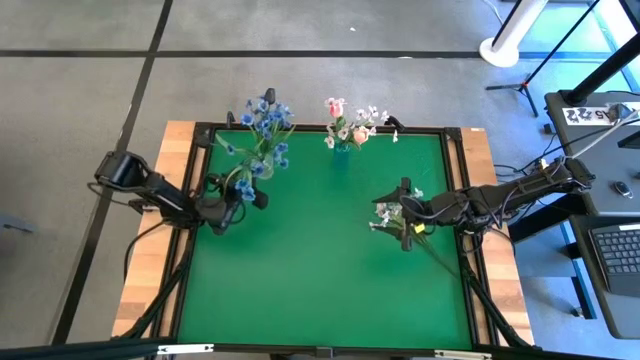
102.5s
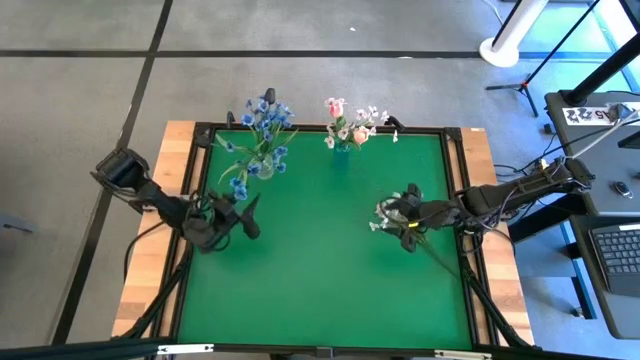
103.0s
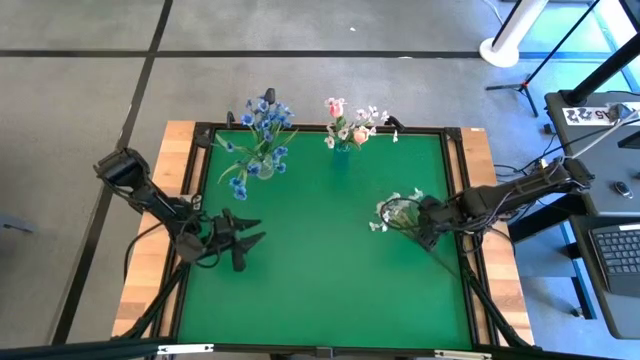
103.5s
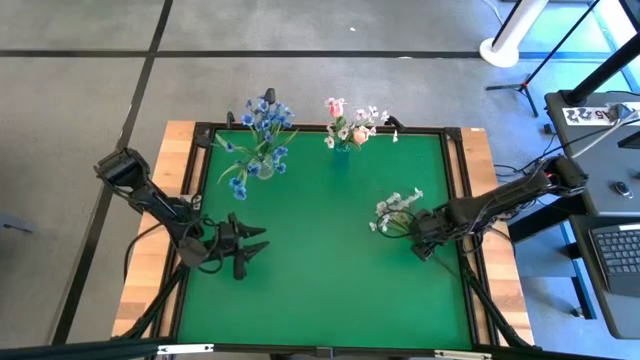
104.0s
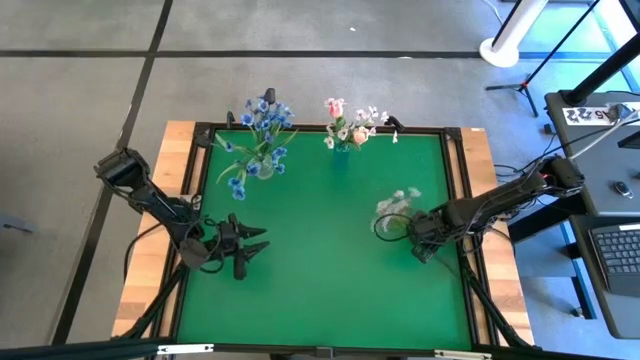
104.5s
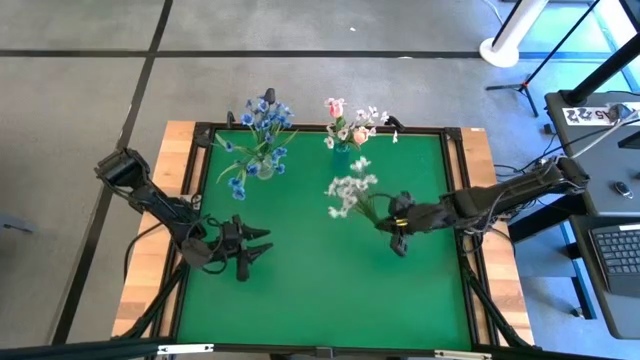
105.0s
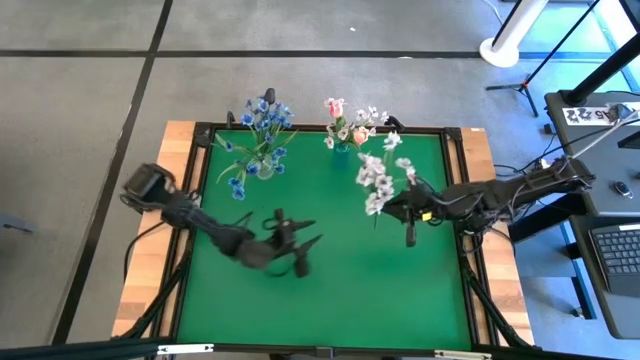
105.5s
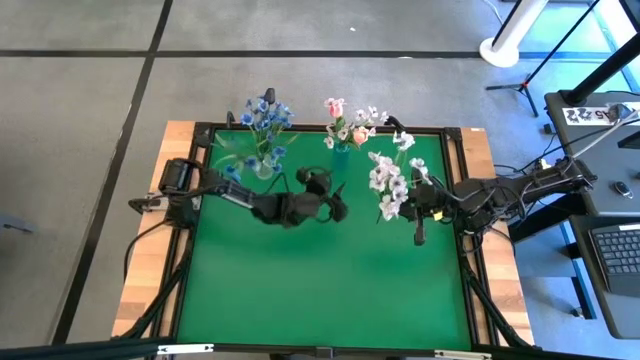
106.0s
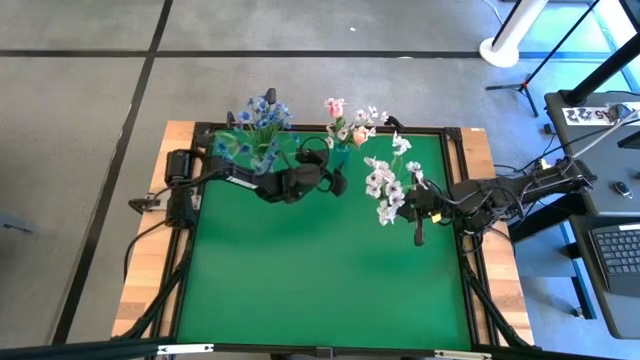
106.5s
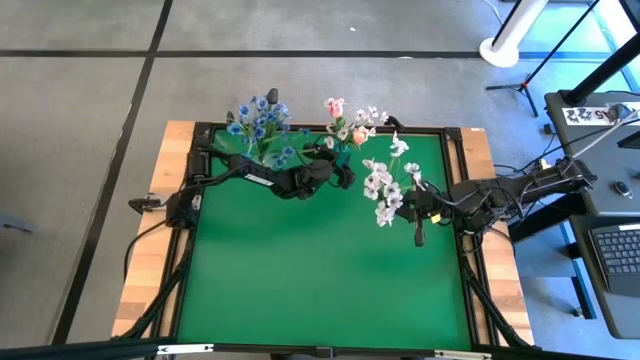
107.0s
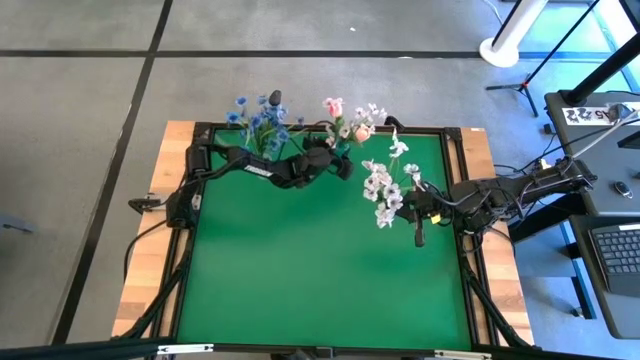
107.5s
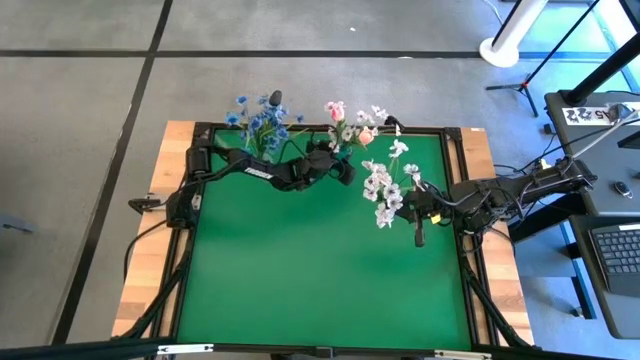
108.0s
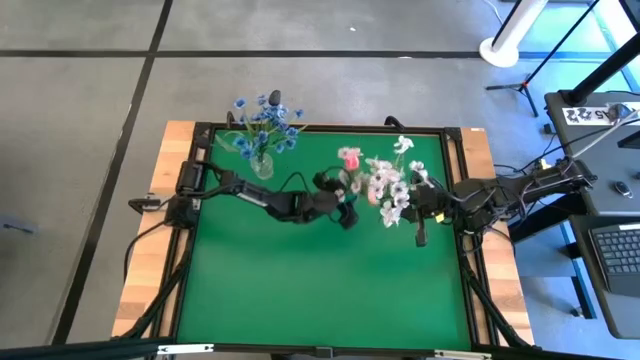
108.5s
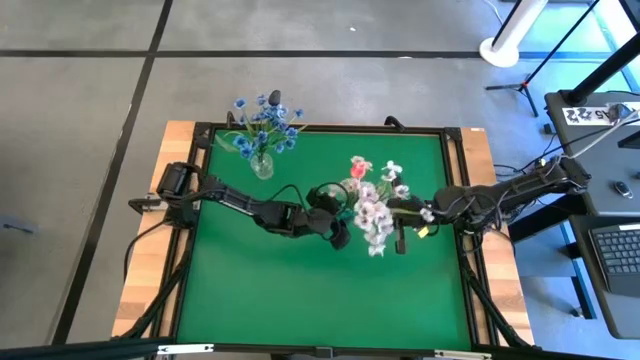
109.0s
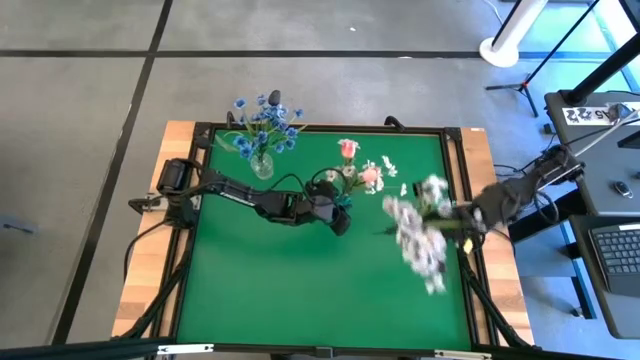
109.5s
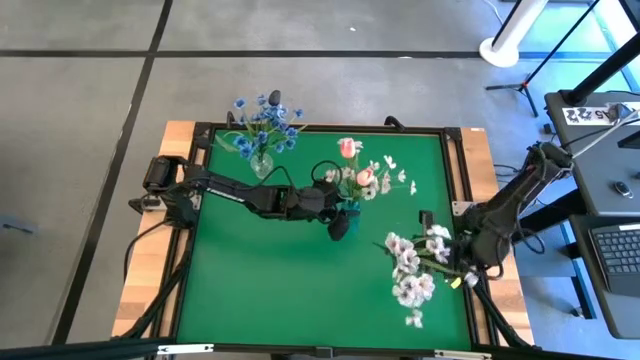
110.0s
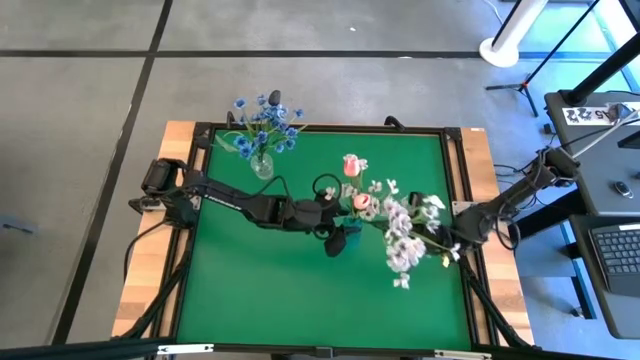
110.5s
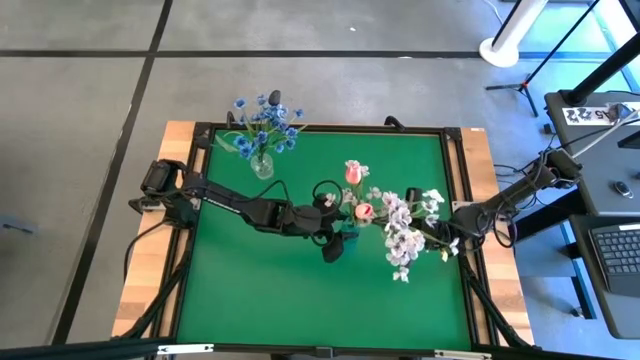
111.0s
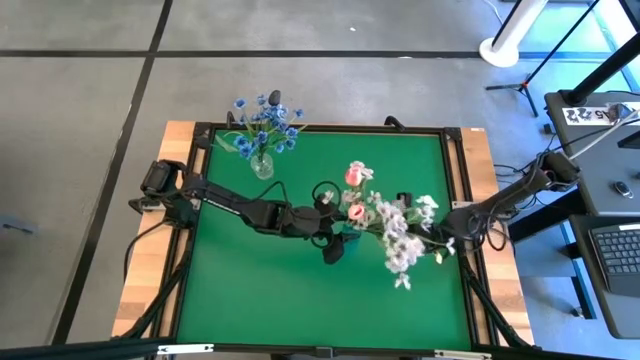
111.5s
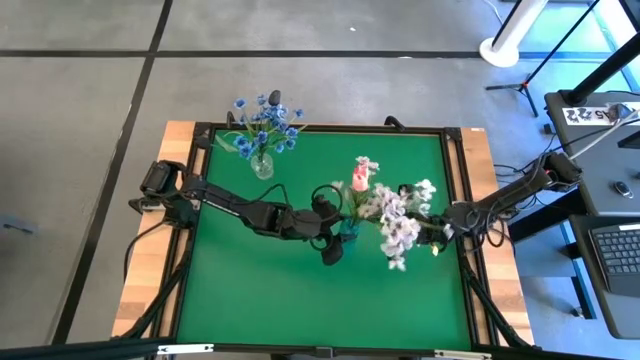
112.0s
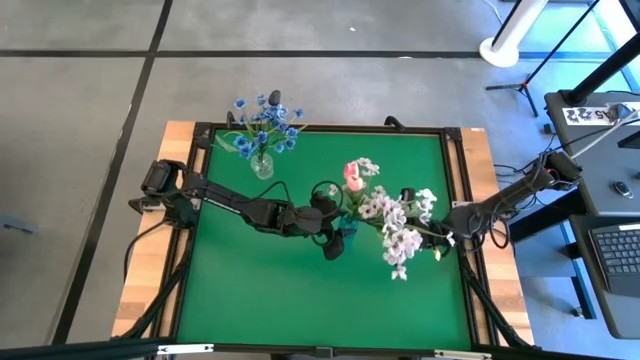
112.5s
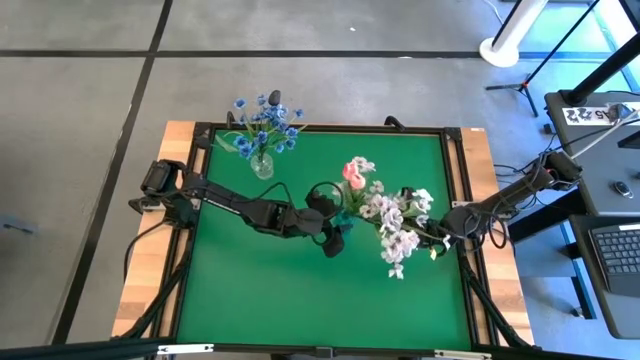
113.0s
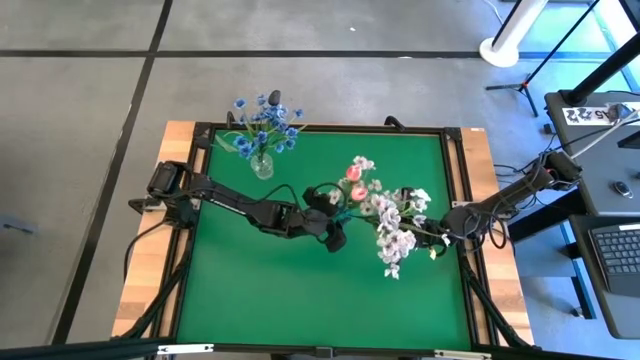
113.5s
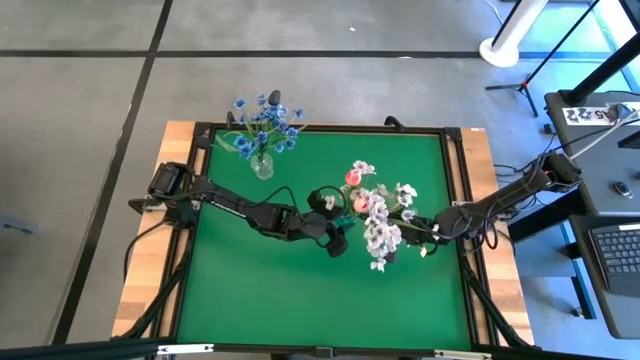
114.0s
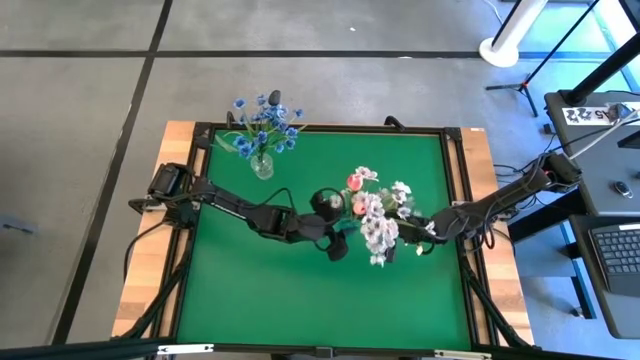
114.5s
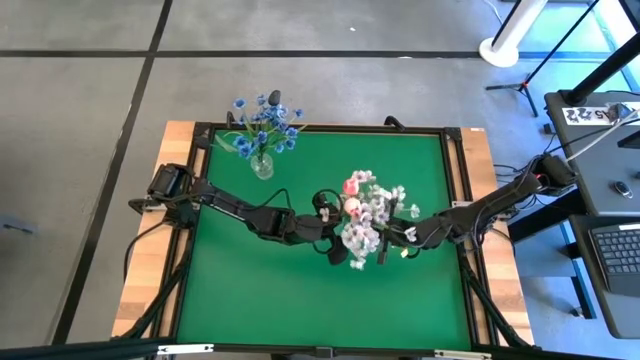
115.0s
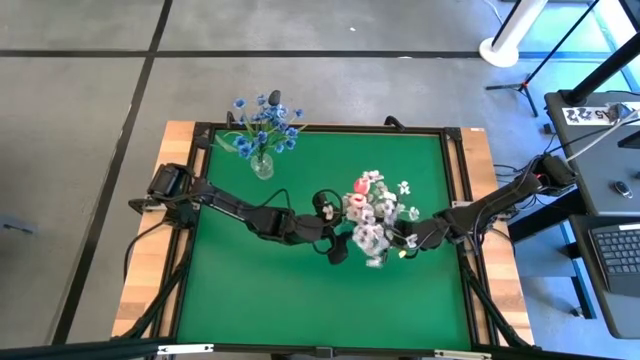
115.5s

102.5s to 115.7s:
Task: Sort flowers into vase by color
Put the white flowers into the blue vase

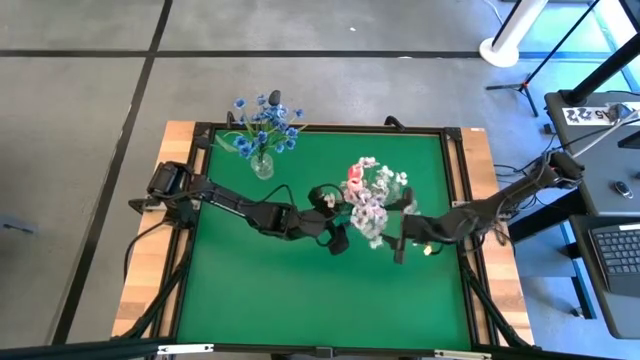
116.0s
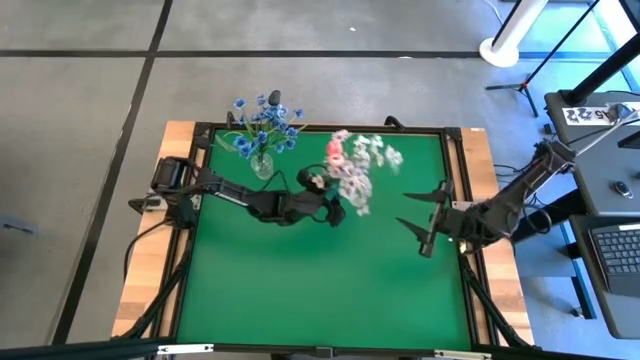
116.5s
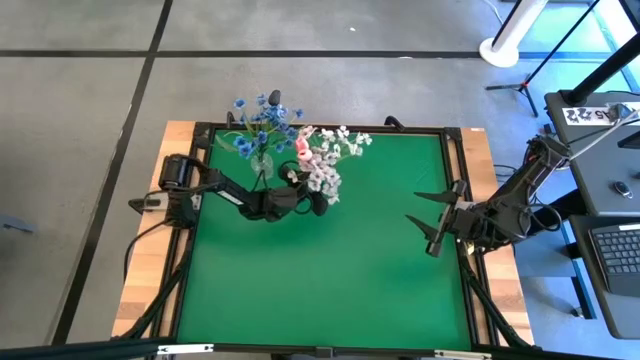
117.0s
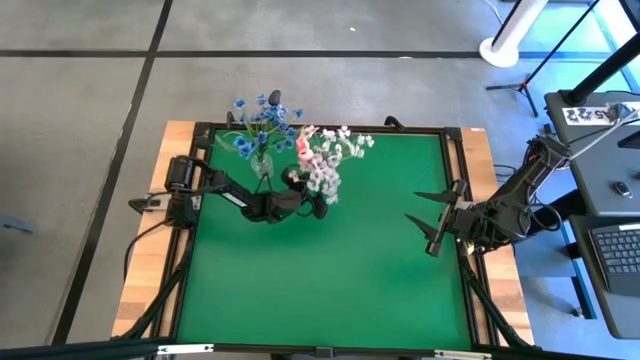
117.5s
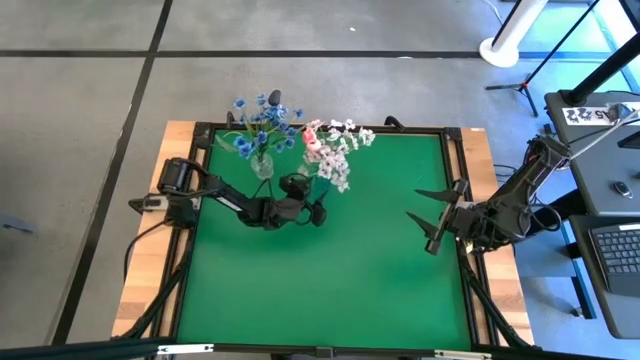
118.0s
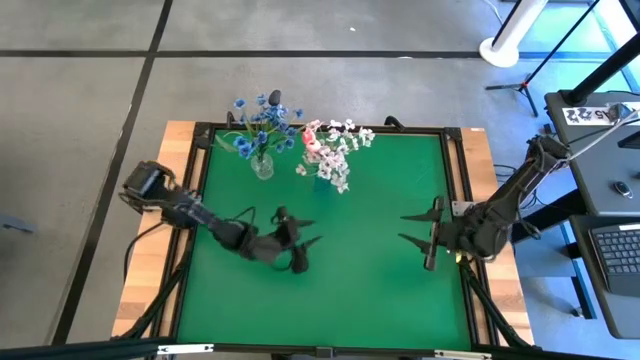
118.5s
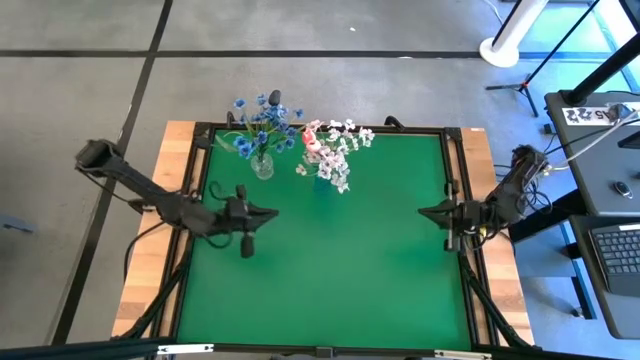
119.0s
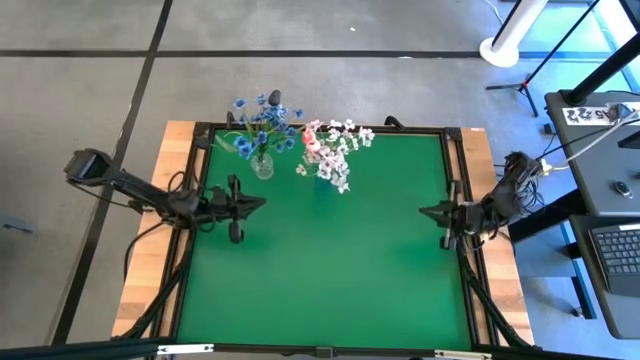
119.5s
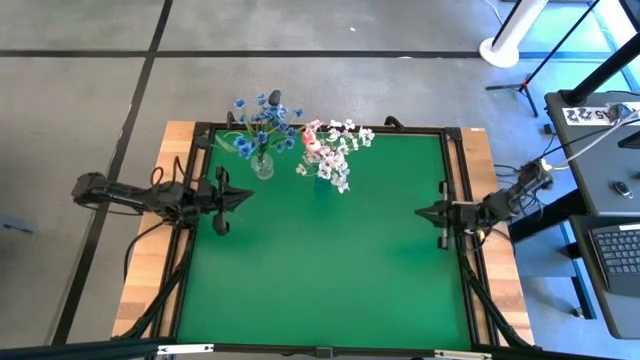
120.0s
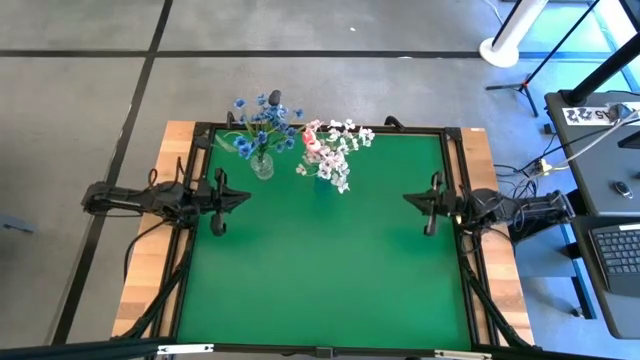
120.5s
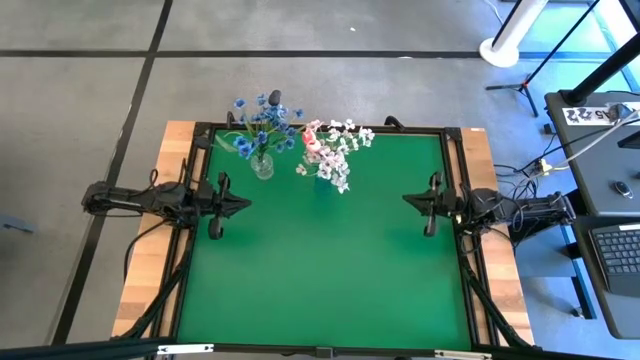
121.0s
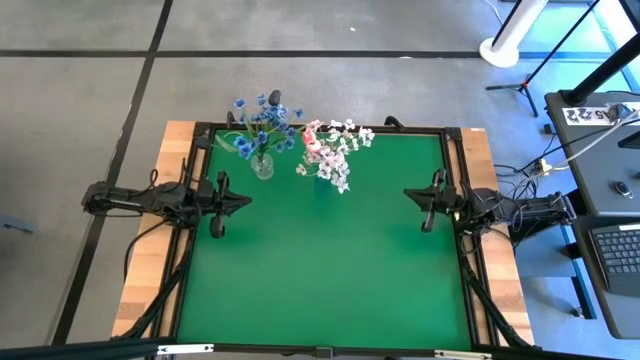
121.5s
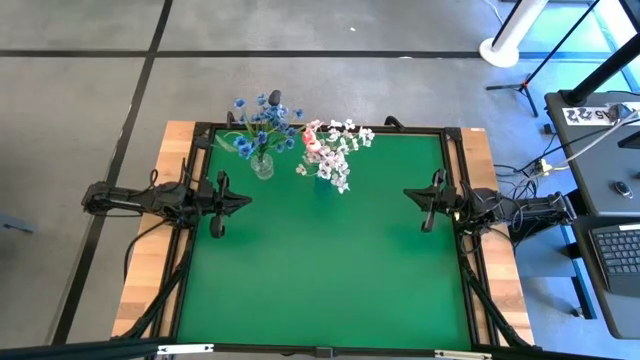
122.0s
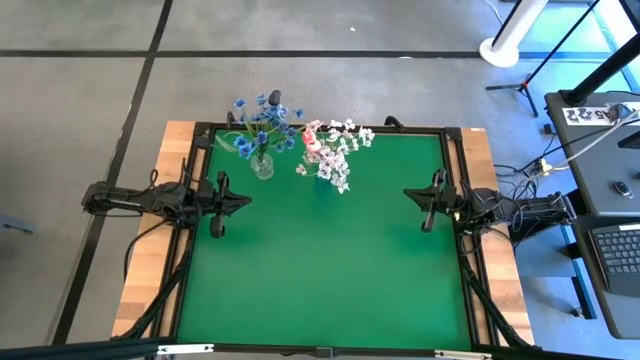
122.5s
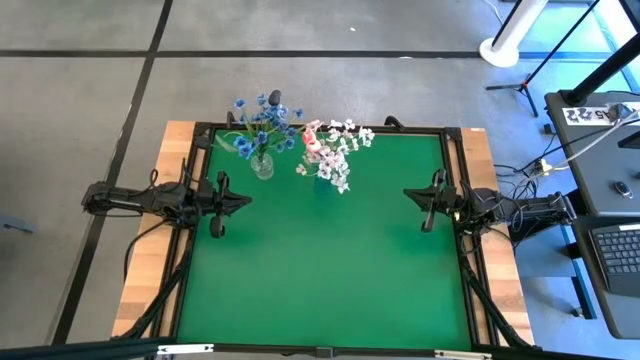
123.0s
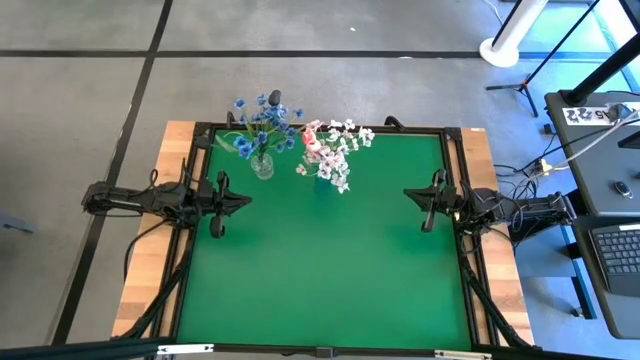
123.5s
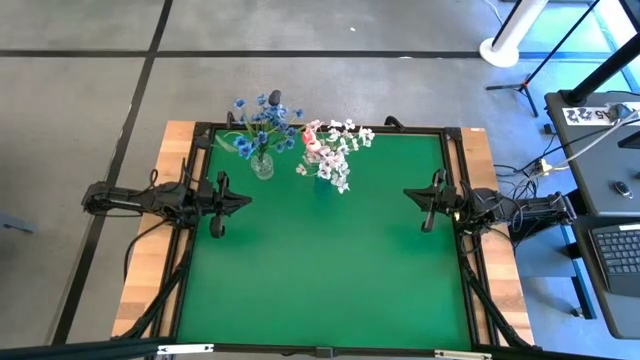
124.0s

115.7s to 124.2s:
Return to Home Position
